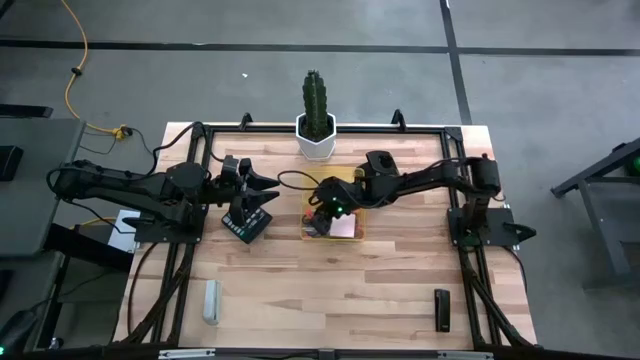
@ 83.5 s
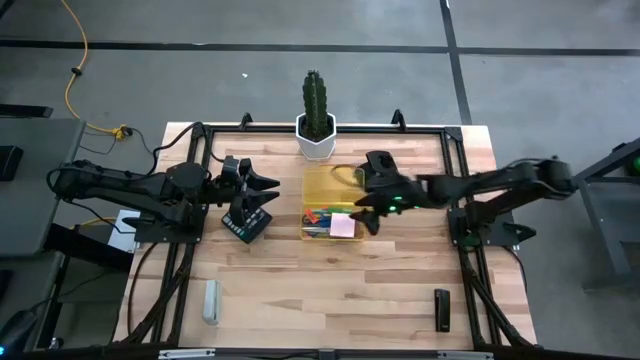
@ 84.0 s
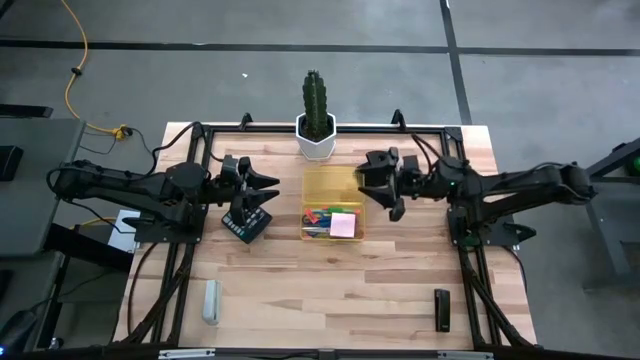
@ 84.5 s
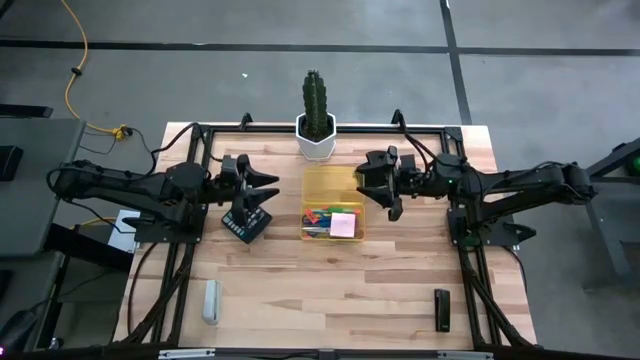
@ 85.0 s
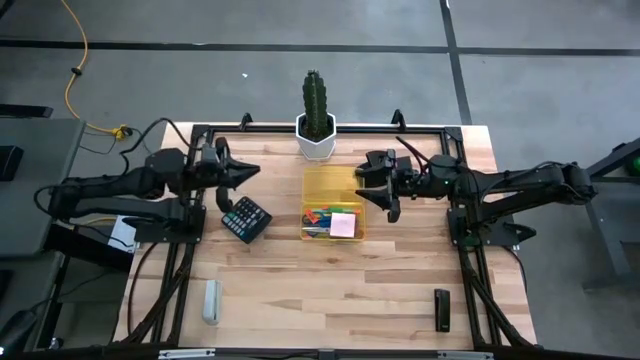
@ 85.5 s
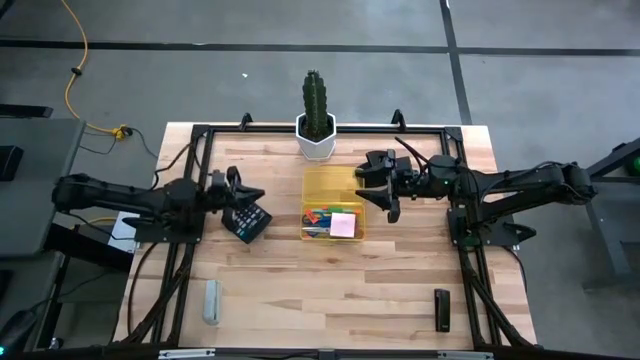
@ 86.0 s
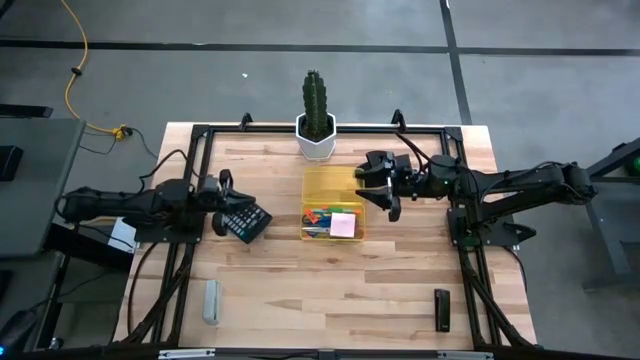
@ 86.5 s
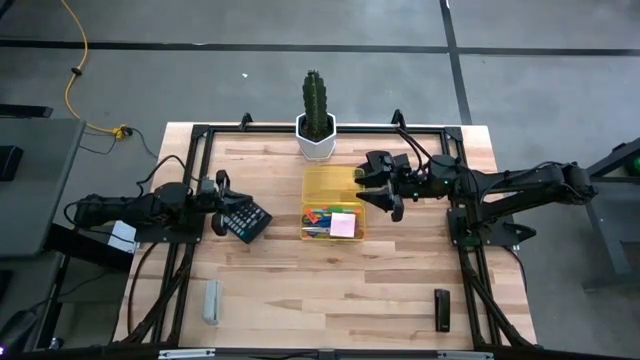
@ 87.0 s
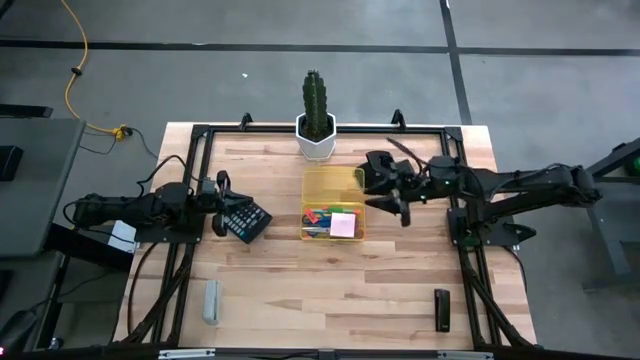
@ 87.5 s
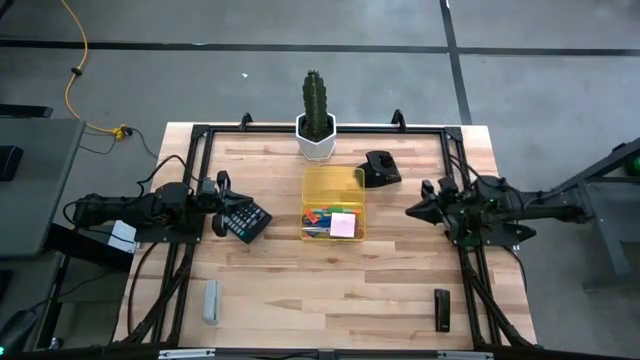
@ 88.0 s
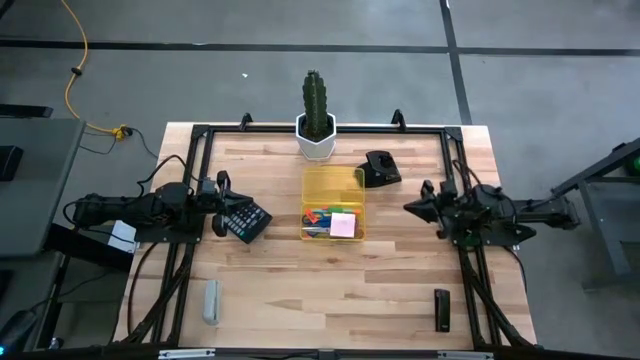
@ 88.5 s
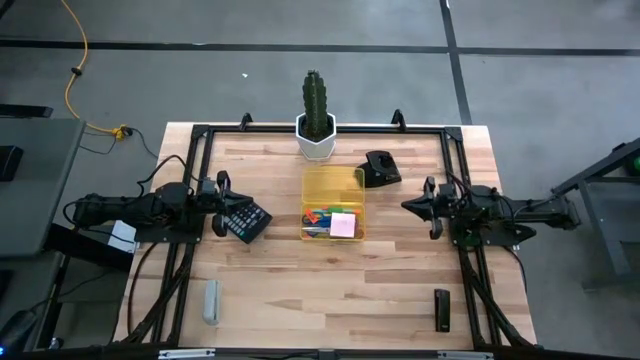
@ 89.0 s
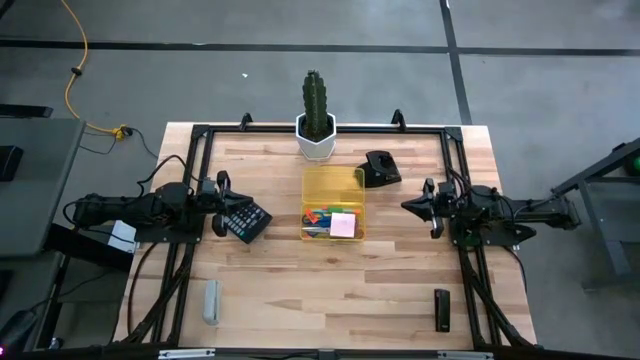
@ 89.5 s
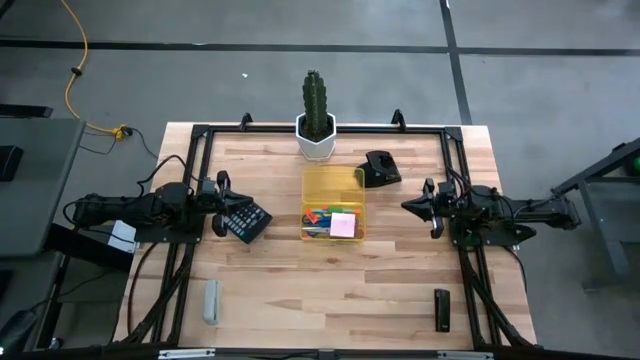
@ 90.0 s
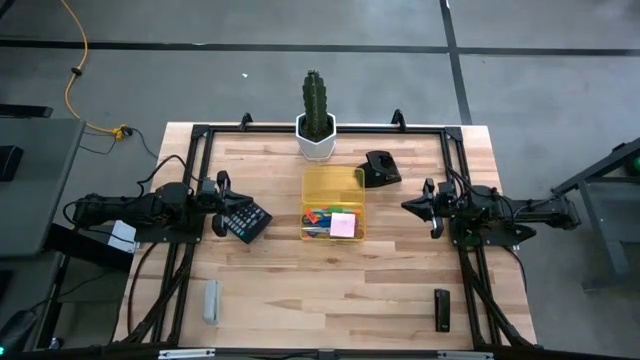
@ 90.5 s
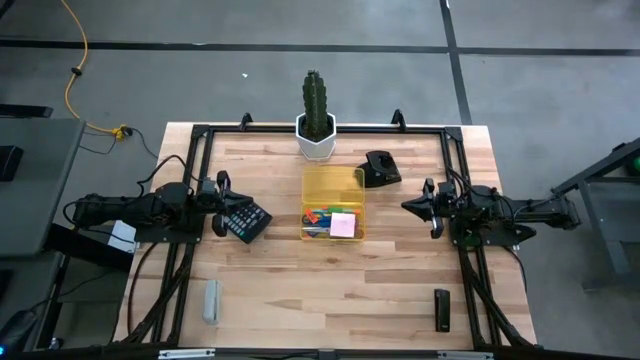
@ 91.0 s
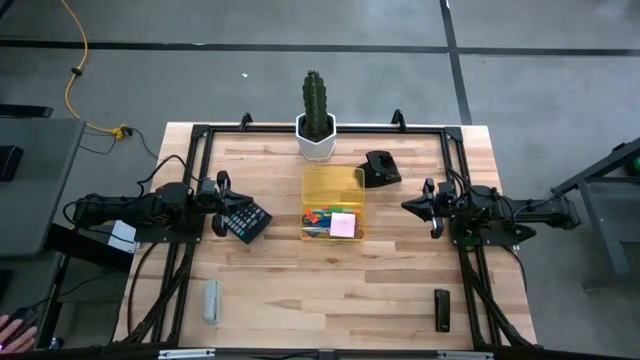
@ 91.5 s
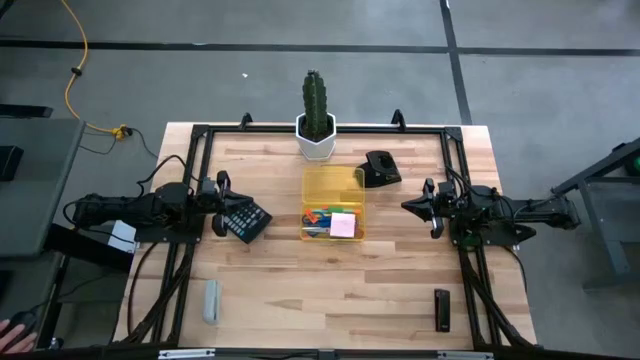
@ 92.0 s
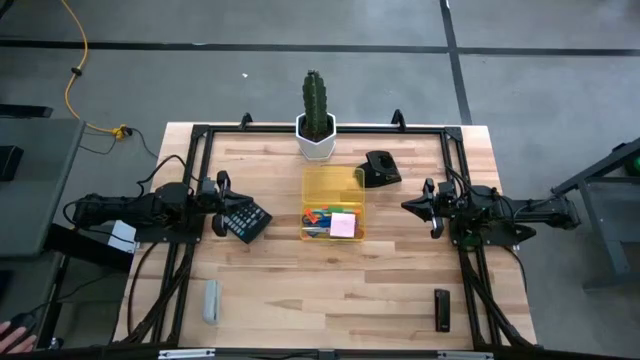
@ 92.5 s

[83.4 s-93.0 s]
Task: Pack school essentials
Return to Home Position

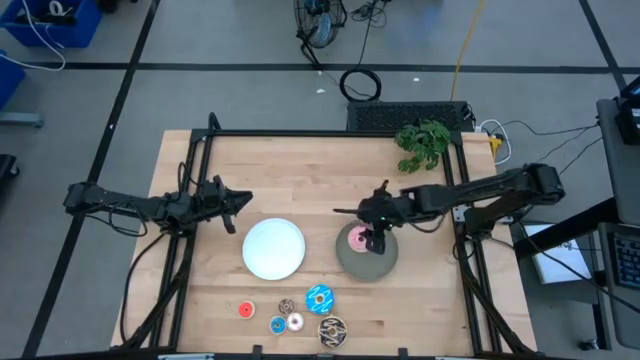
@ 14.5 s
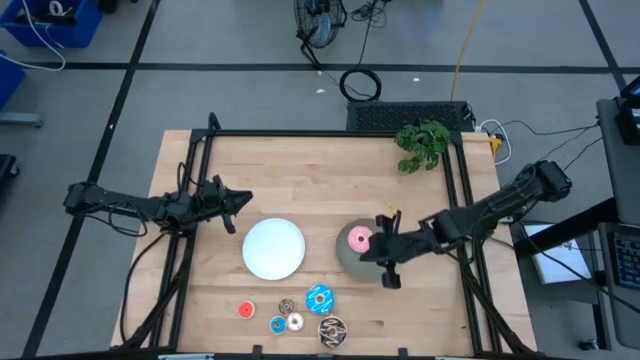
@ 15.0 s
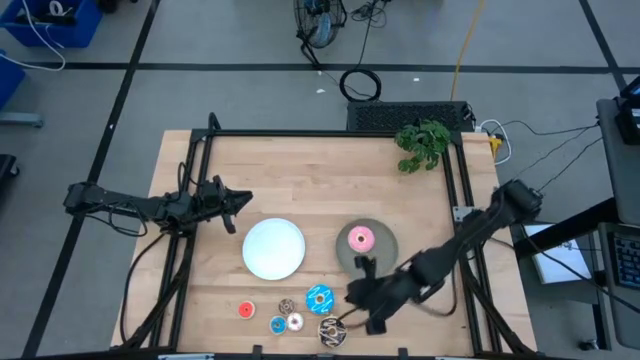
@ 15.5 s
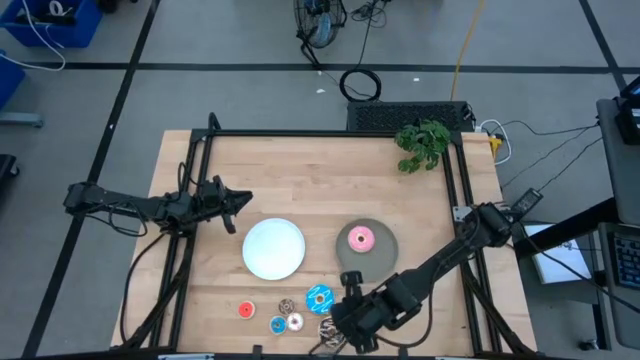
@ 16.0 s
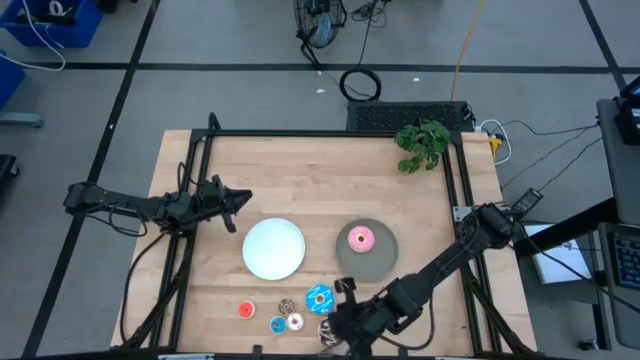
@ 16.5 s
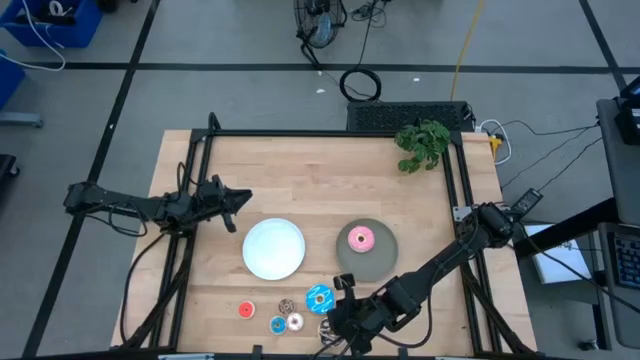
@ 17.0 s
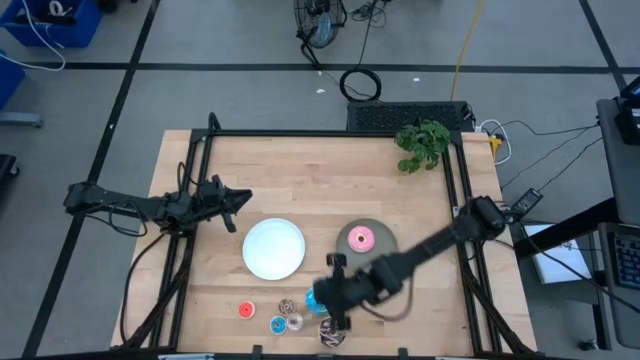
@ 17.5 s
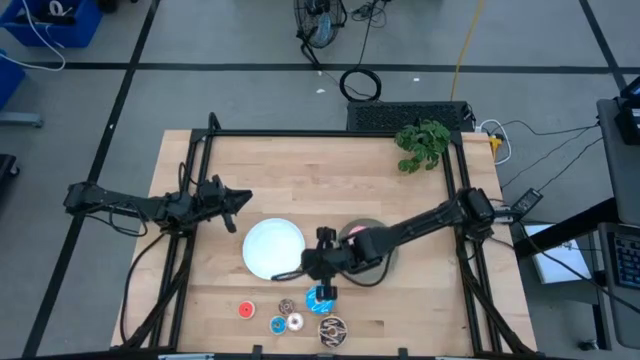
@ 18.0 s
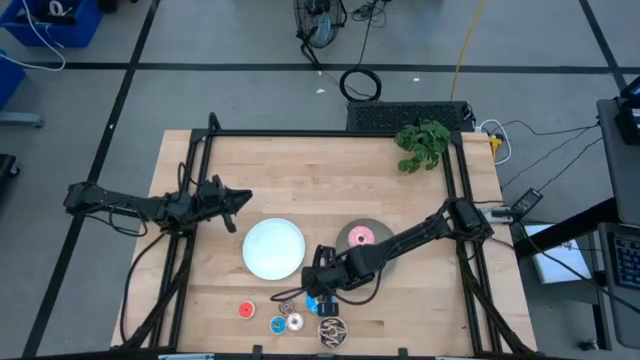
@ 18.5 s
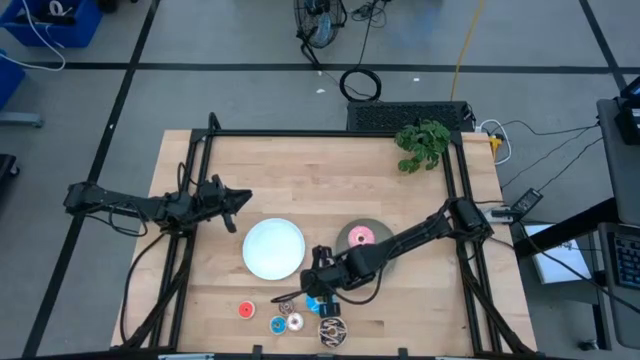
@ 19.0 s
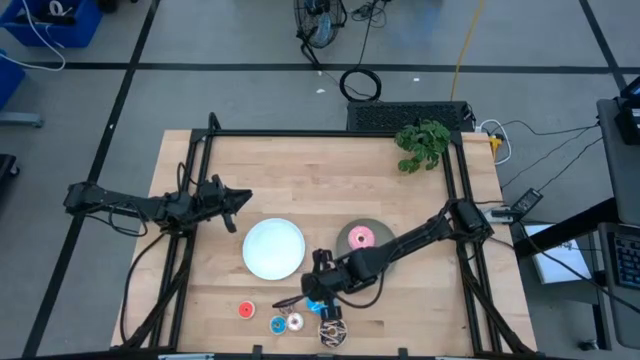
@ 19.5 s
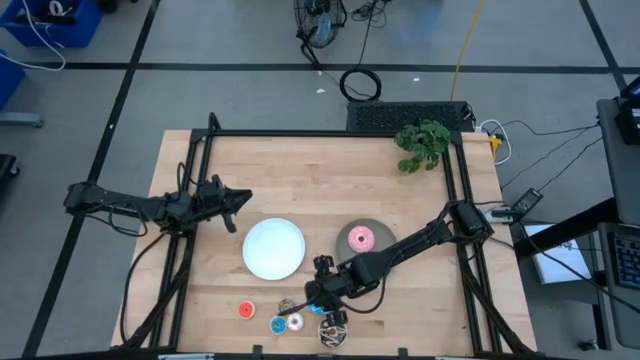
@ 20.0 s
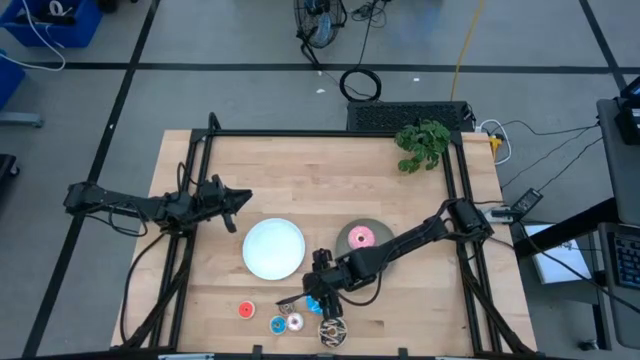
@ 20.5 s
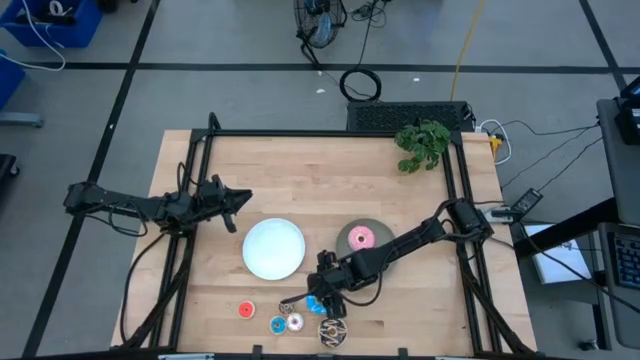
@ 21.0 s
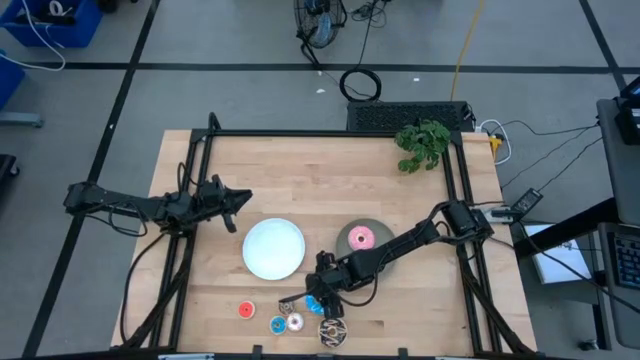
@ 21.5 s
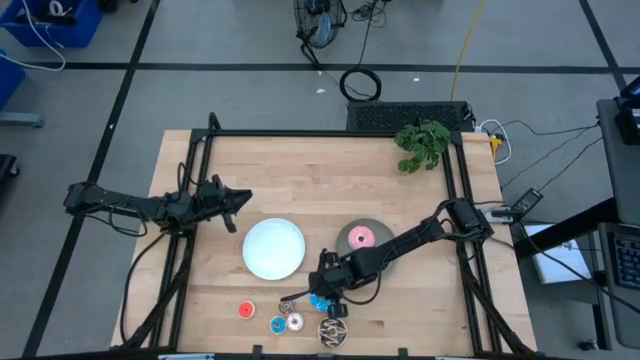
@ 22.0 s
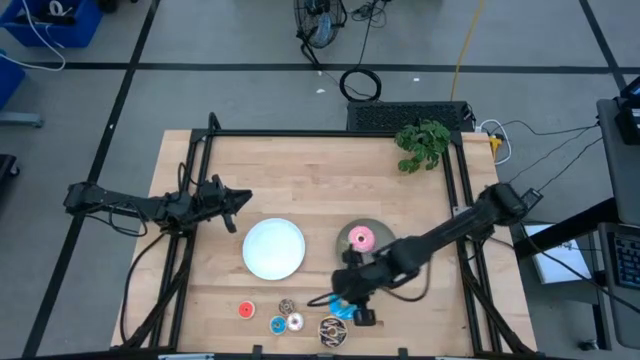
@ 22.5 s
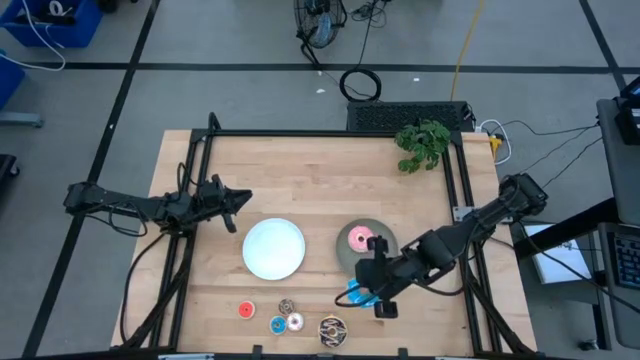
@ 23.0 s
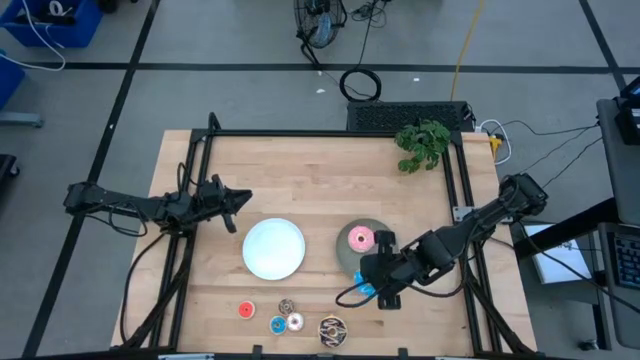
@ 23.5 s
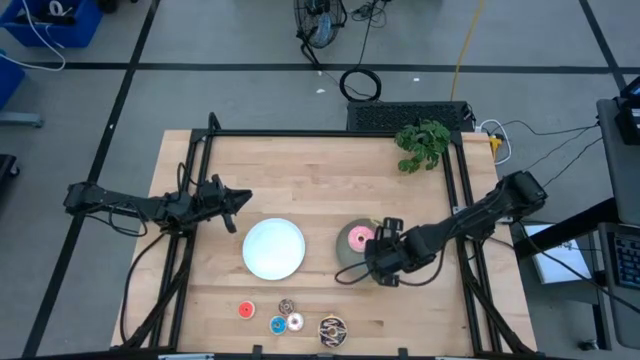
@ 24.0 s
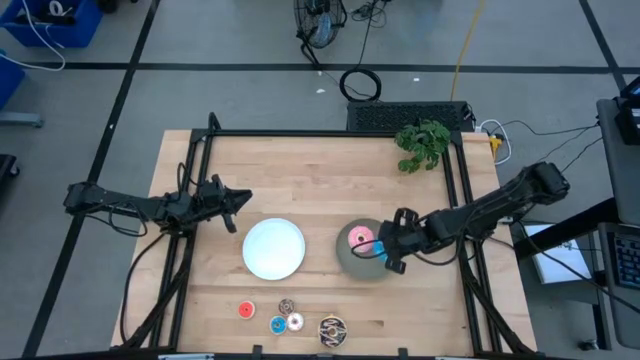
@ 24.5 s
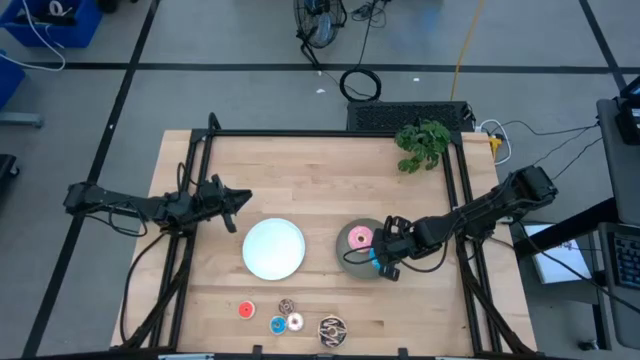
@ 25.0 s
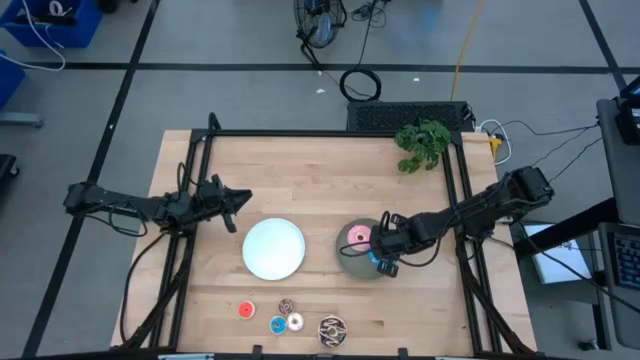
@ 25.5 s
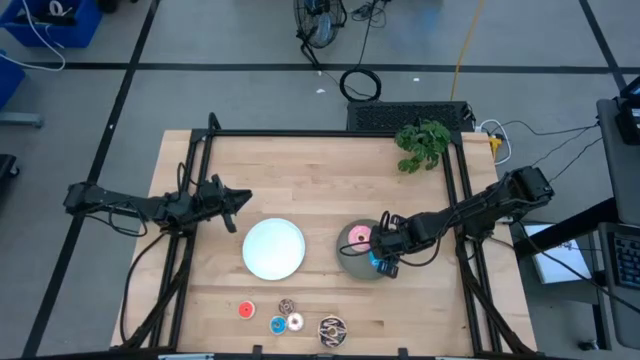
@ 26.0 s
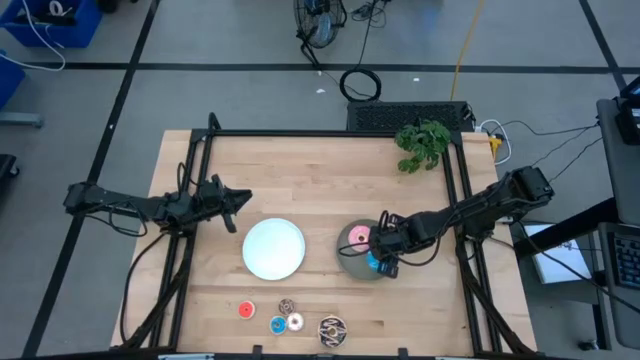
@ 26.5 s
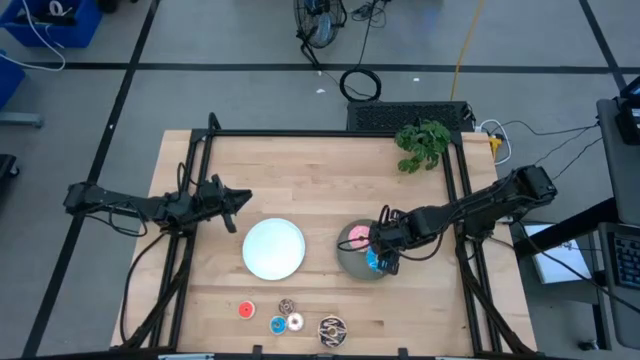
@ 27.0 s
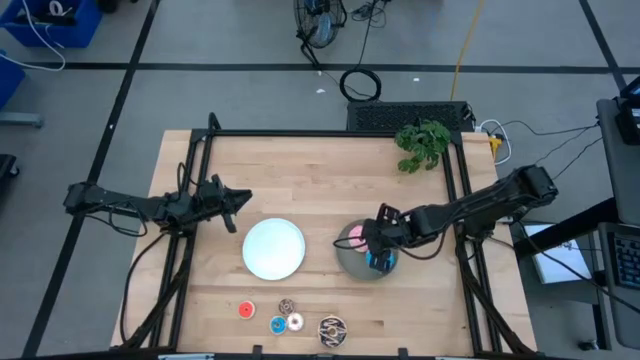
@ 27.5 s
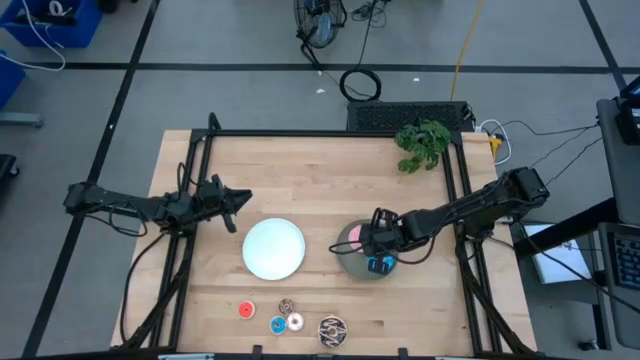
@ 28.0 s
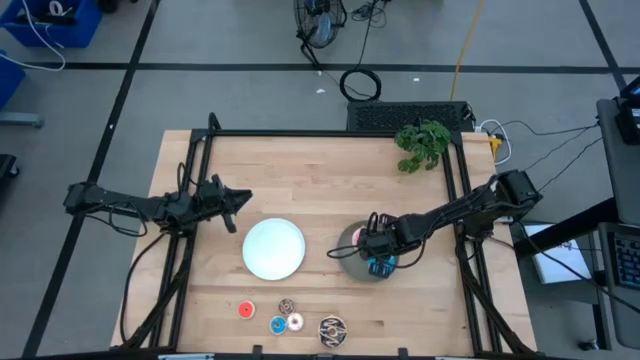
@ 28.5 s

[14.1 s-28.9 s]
Task: Pick & Place donuts
Put the big blue donut on the gray plate
